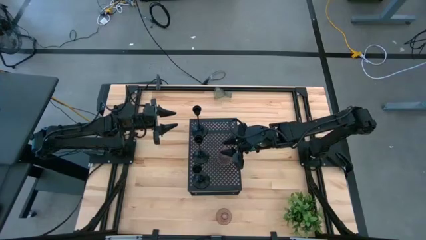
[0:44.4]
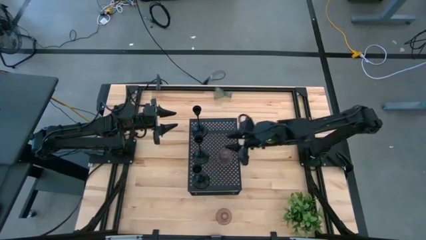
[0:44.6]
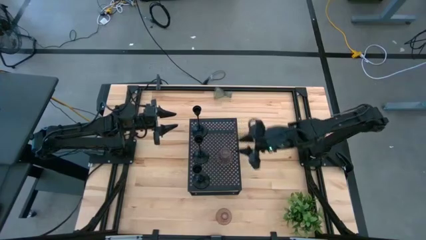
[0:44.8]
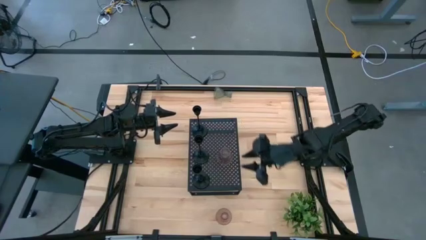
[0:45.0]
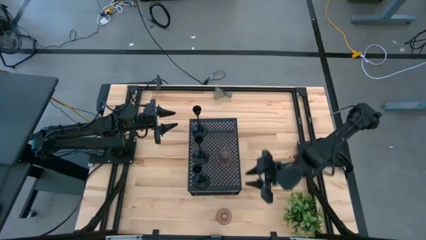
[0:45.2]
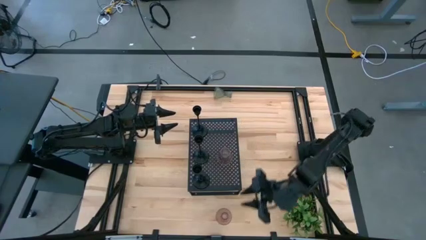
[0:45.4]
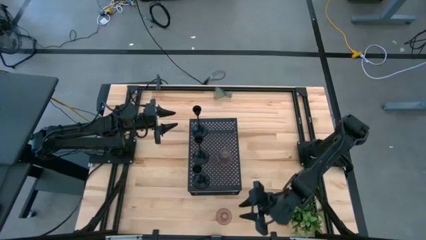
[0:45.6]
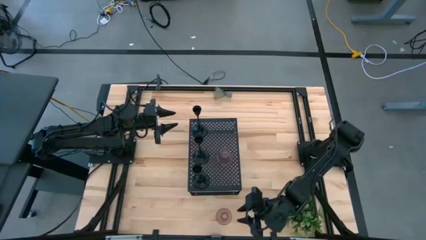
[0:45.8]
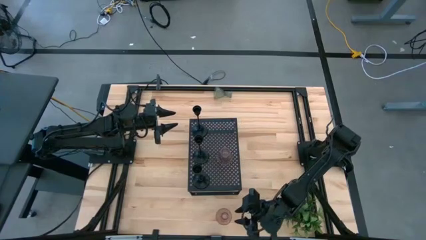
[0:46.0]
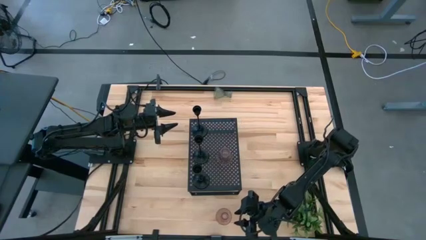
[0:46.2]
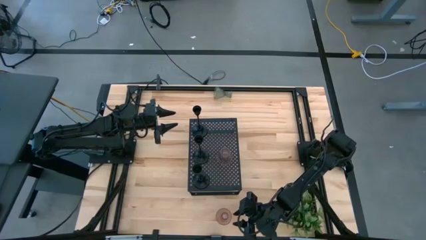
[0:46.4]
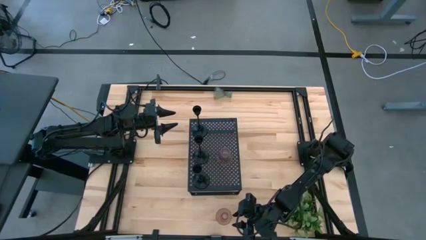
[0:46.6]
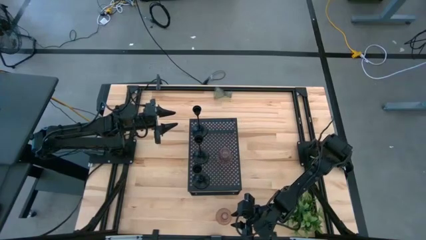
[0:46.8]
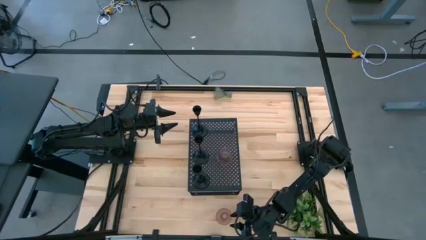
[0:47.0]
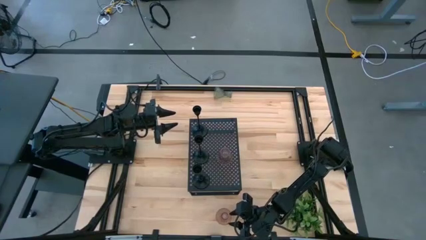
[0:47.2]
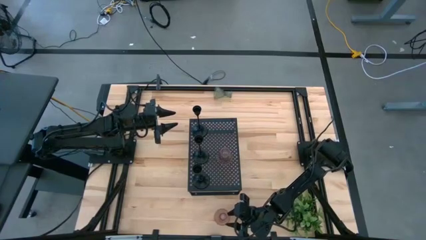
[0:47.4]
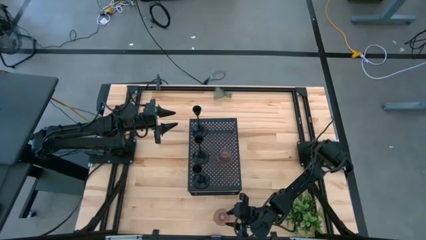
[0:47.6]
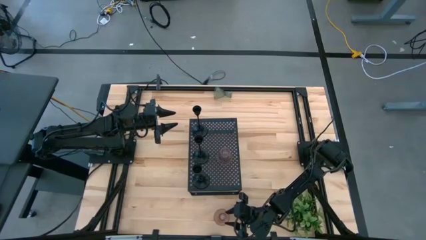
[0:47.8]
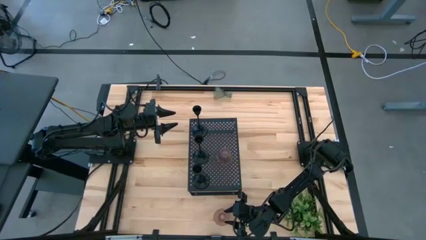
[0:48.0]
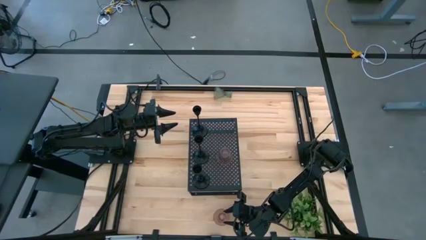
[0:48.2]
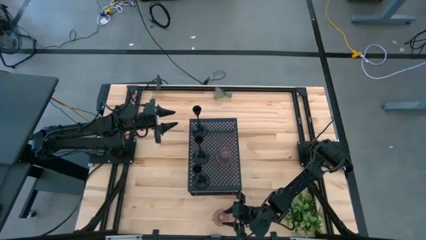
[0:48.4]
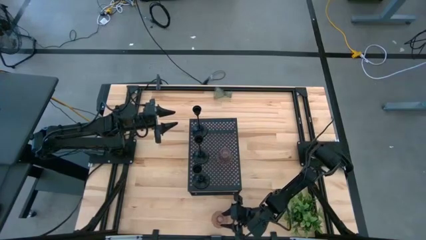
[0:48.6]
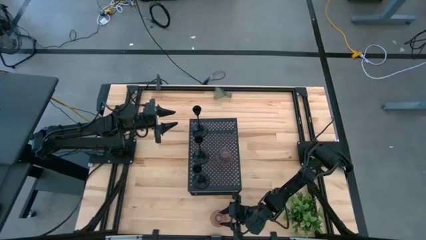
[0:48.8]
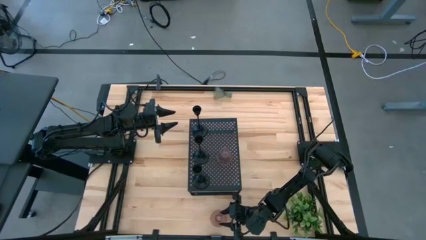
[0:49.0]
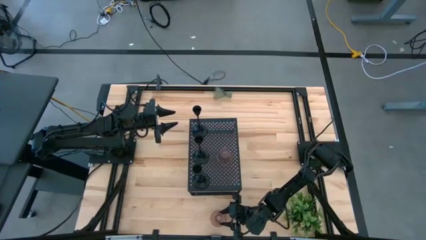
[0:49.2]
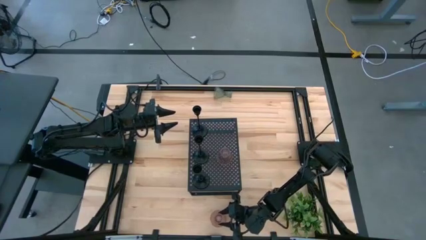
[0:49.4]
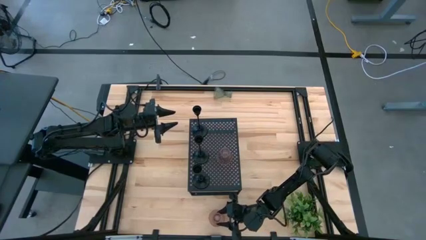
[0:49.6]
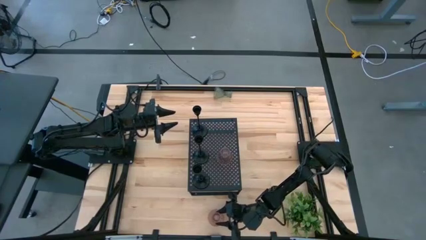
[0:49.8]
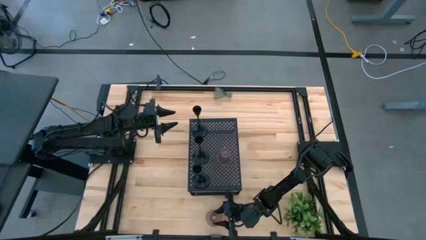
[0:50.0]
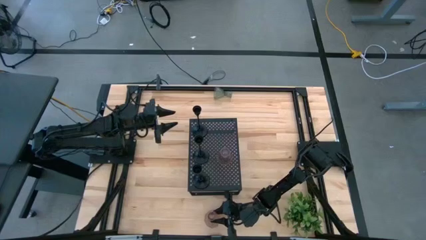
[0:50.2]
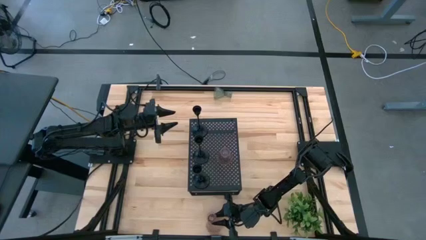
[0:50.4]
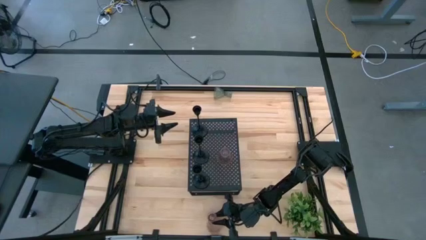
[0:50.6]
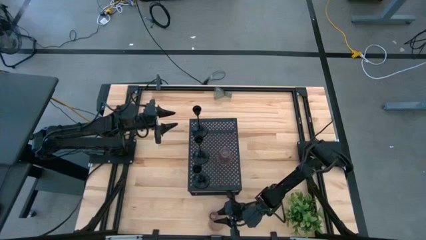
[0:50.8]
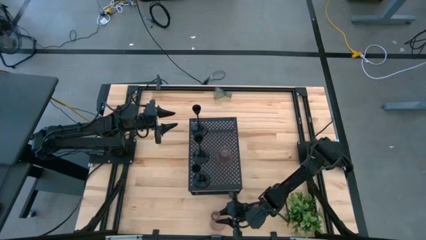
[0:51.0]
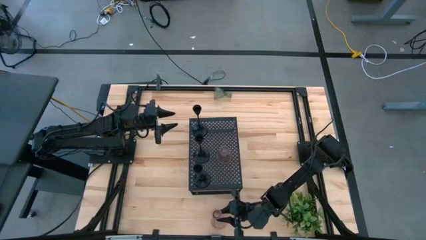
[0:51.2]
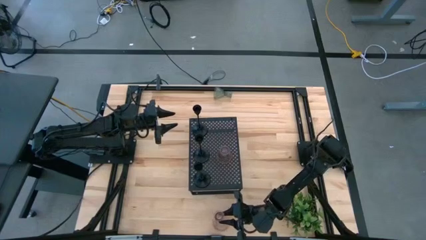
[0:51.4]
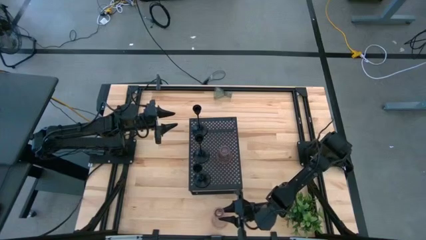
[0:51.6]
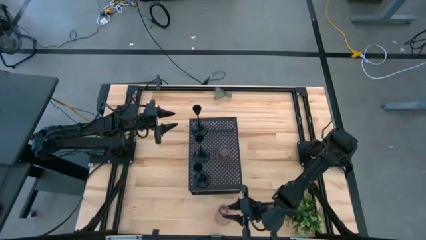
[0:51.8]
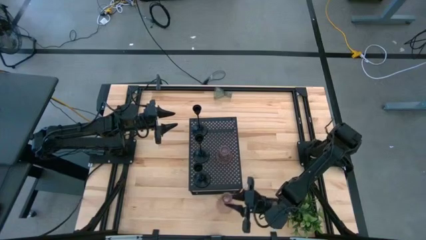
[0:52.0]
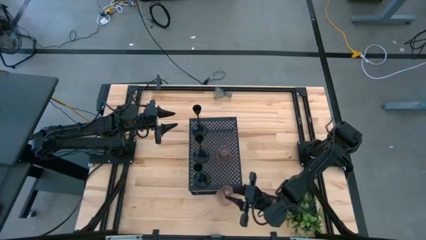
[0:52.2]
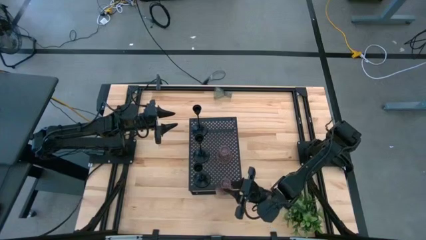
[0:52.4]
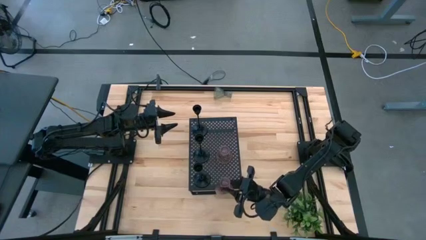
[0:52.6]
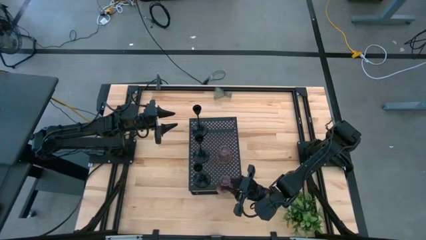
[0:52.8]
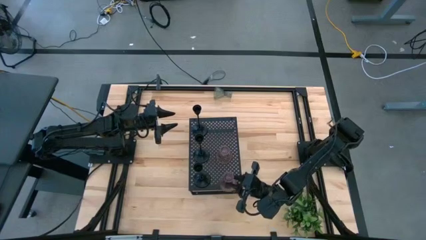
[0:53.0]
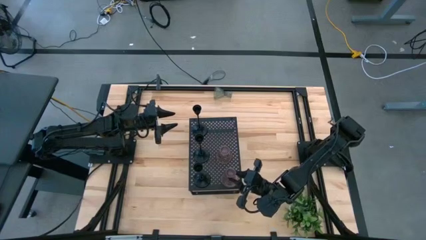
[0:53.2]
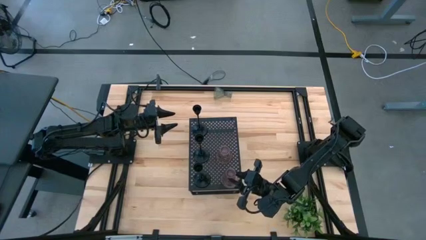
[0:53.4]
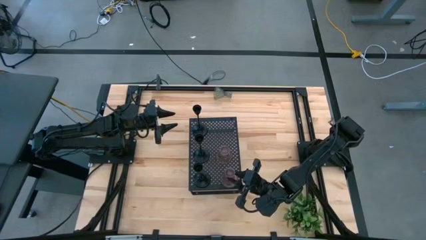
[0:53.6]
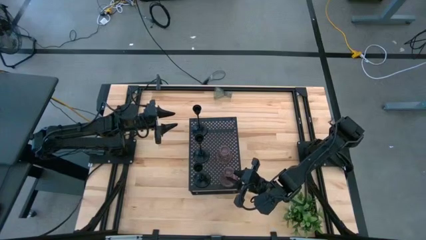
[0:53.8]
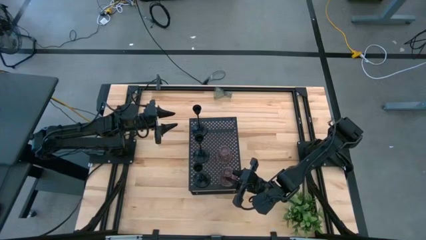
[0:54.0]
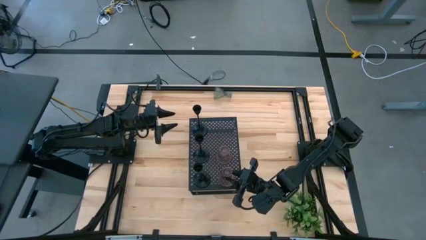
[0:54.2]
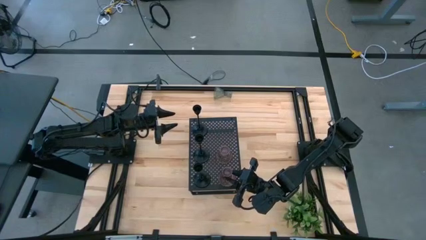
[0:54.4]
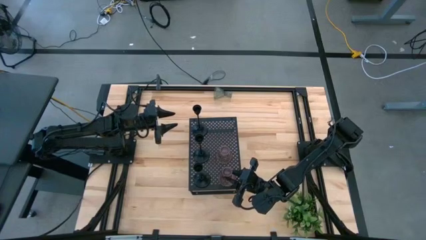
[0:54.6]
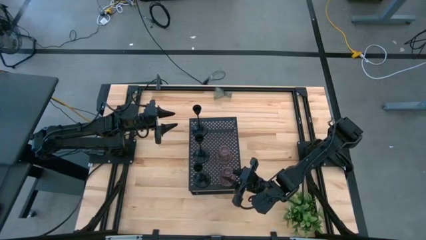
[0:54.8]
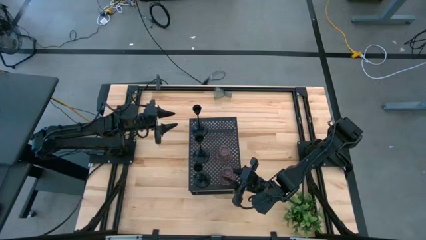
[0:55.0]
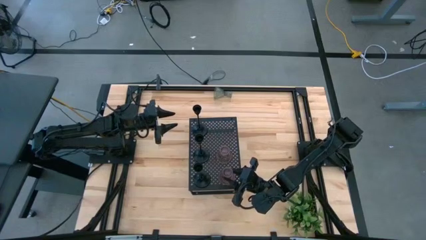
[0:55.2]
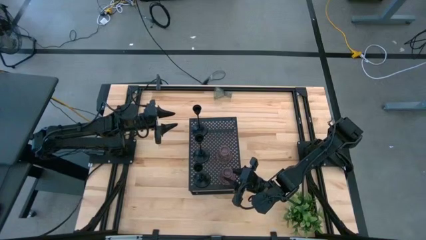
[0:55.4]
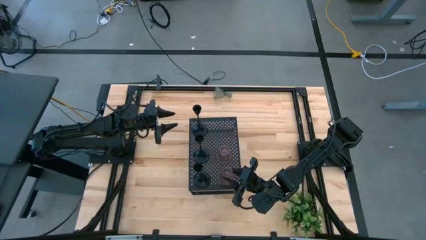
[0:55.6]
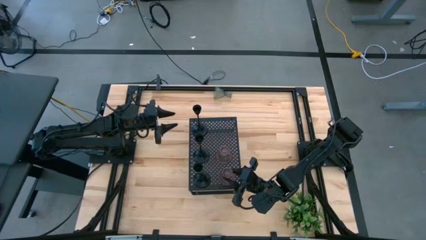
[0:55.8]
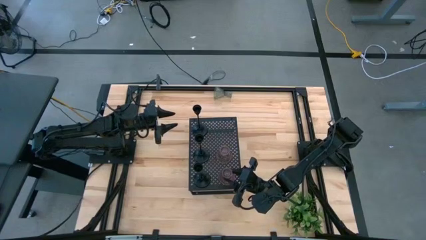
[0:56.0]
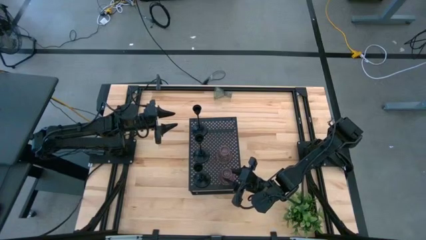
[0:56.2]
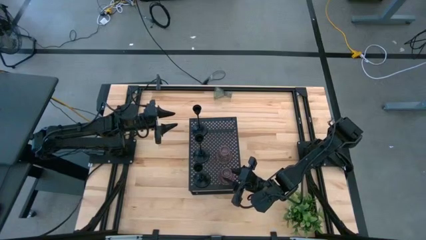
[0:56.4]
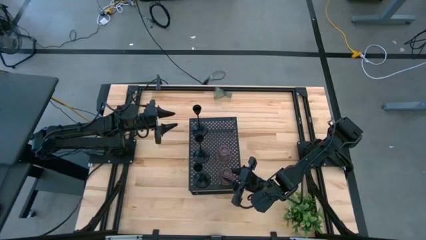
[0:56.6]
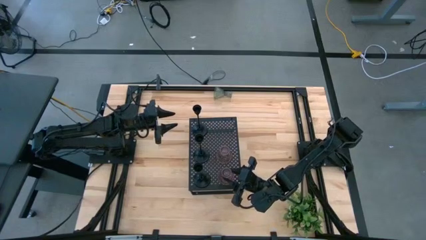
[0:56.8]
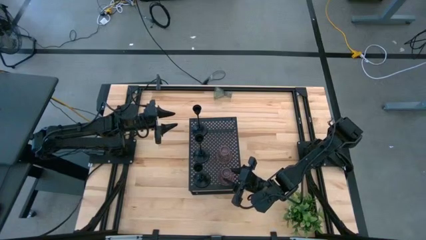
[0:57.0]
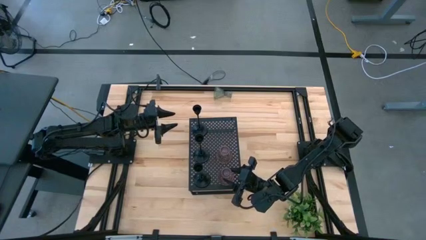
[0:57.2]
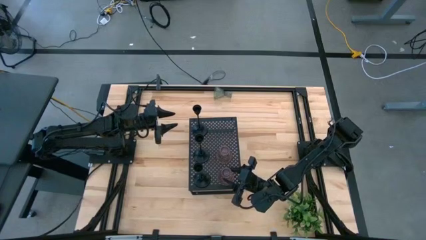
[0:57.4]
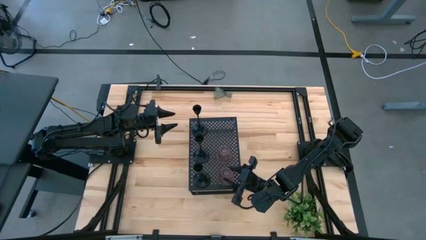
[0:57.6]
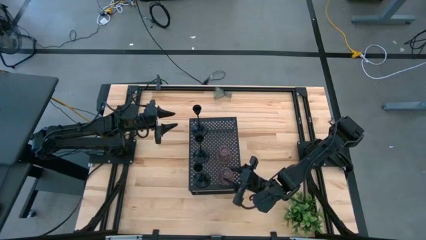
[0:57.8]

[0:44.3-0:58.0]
Task: Pick & Place candle stick holders
Put the violet glass candle holder on the shelf
